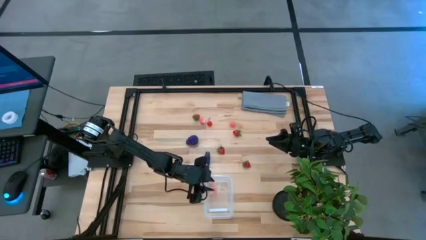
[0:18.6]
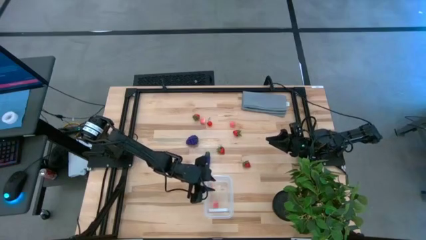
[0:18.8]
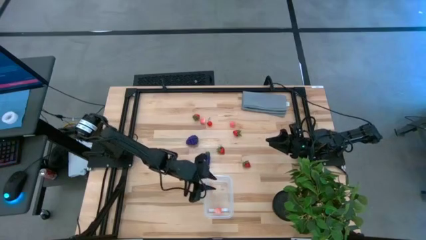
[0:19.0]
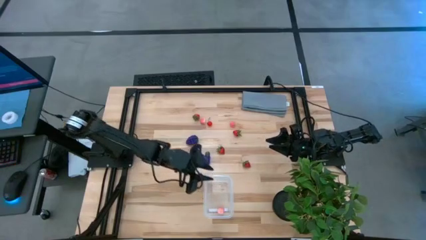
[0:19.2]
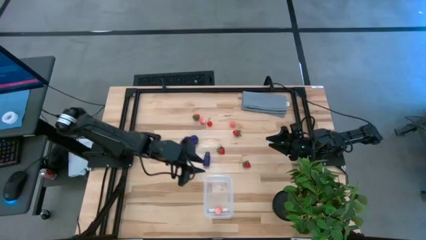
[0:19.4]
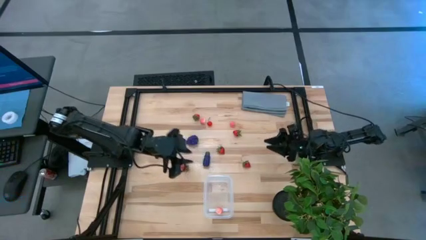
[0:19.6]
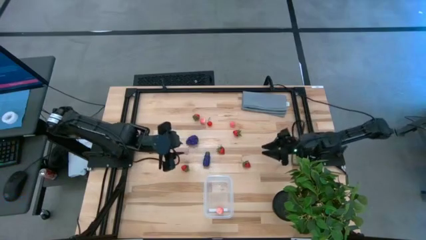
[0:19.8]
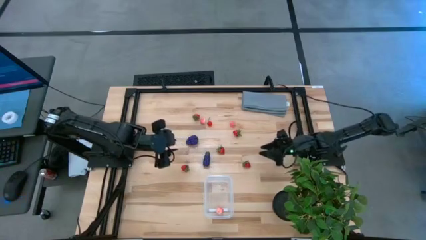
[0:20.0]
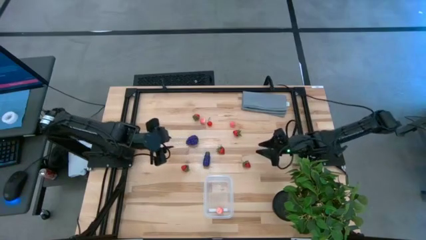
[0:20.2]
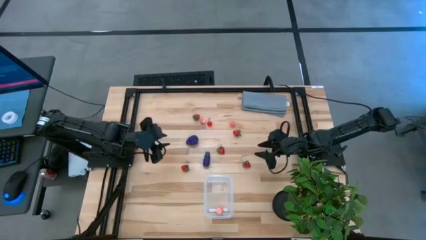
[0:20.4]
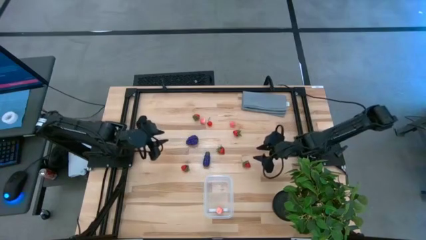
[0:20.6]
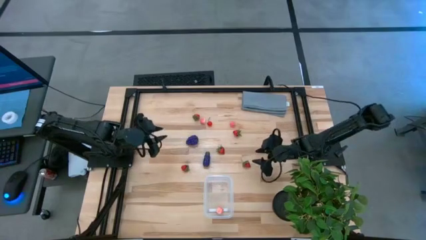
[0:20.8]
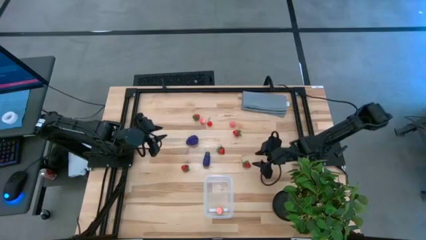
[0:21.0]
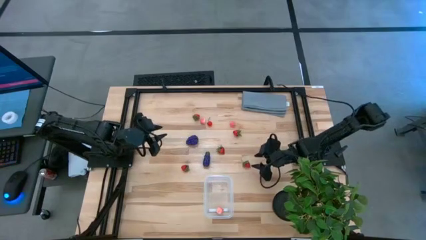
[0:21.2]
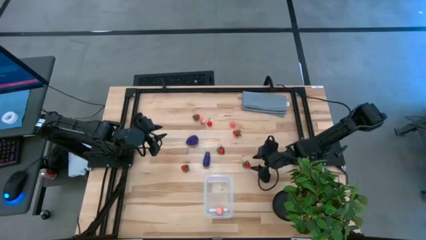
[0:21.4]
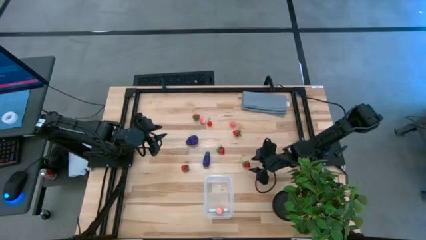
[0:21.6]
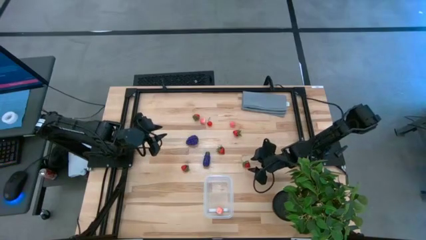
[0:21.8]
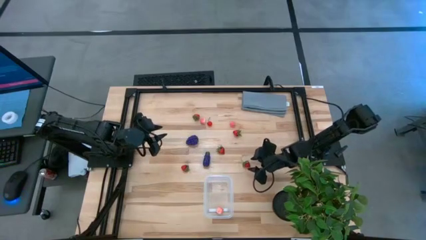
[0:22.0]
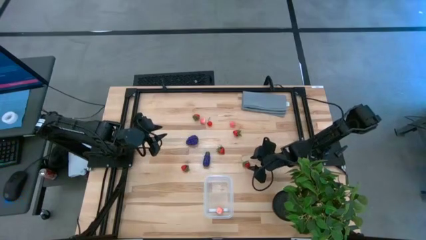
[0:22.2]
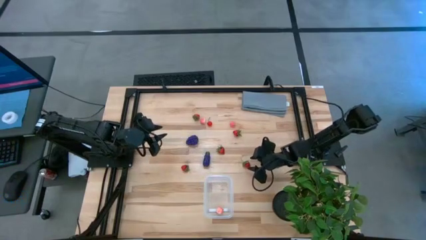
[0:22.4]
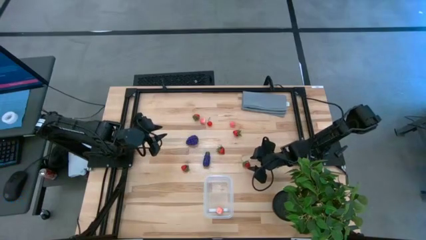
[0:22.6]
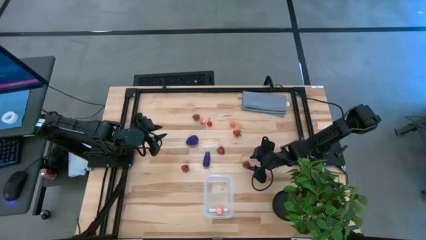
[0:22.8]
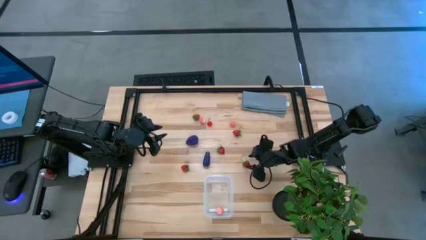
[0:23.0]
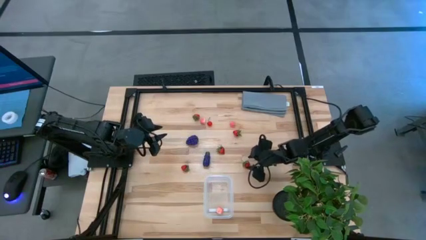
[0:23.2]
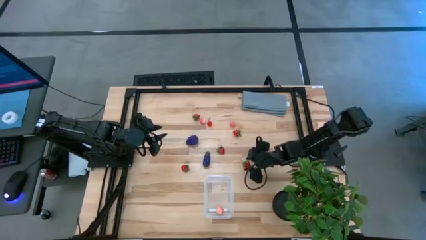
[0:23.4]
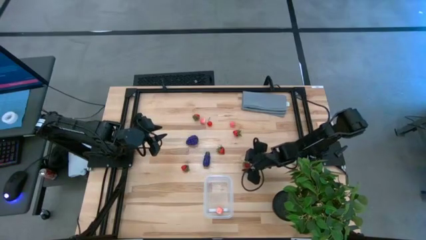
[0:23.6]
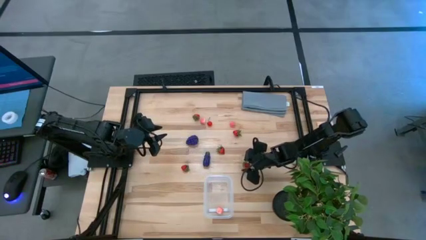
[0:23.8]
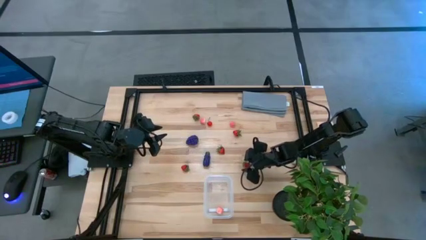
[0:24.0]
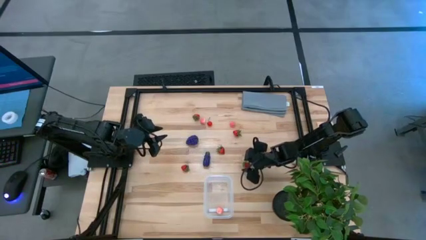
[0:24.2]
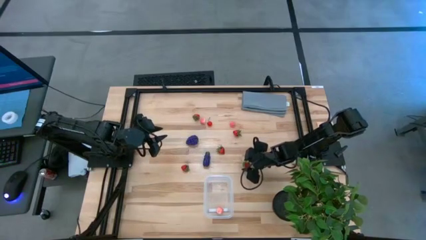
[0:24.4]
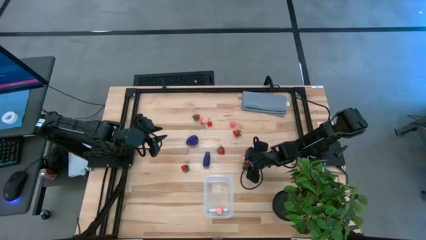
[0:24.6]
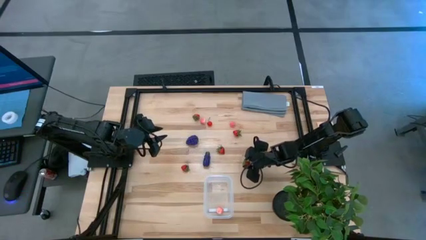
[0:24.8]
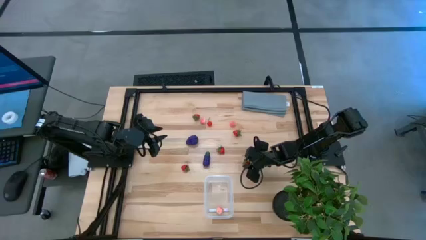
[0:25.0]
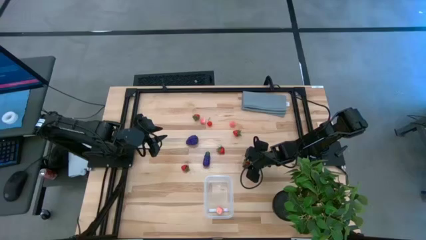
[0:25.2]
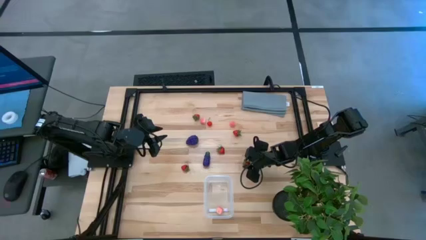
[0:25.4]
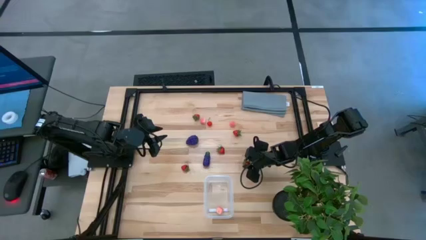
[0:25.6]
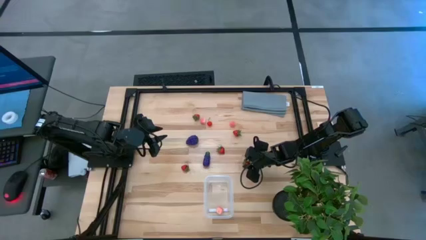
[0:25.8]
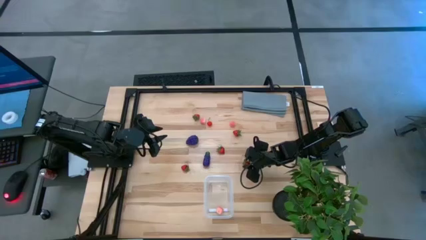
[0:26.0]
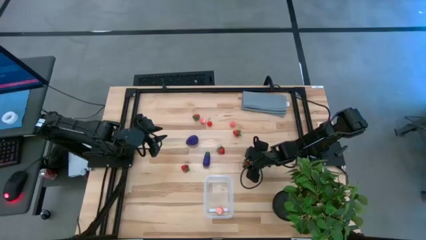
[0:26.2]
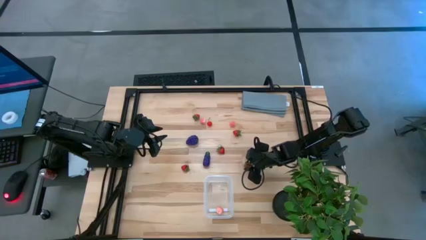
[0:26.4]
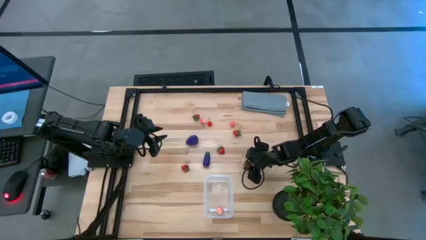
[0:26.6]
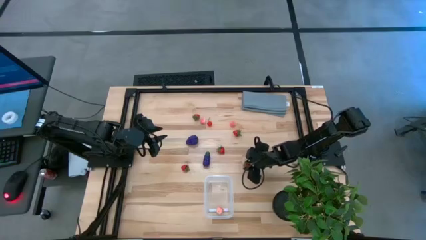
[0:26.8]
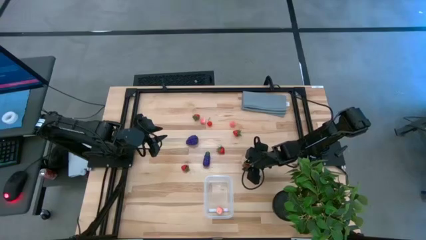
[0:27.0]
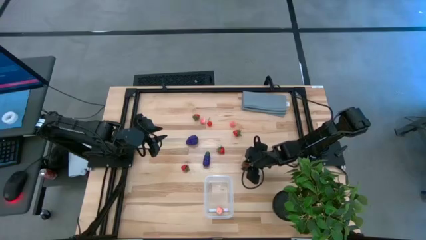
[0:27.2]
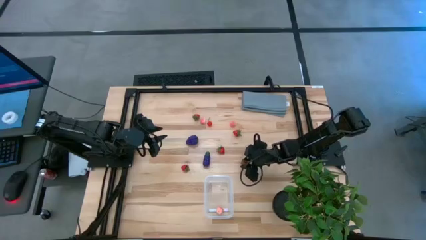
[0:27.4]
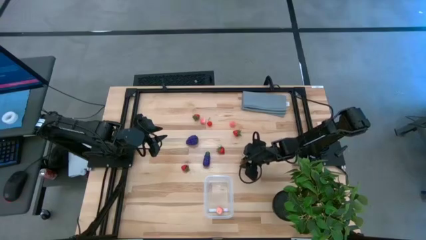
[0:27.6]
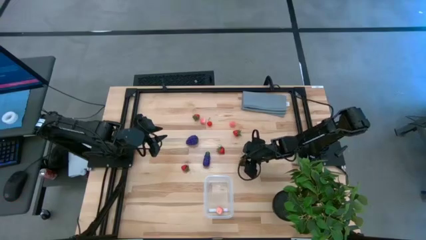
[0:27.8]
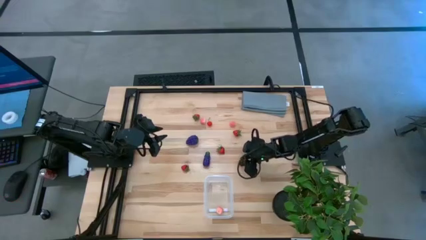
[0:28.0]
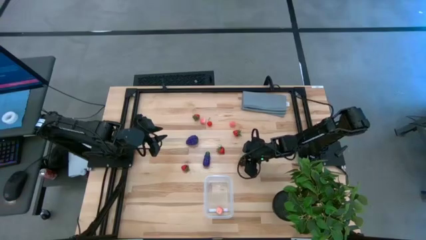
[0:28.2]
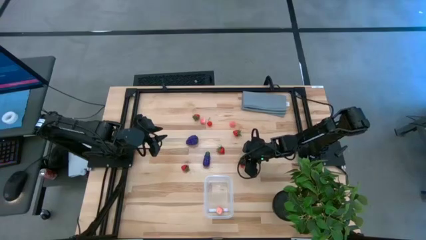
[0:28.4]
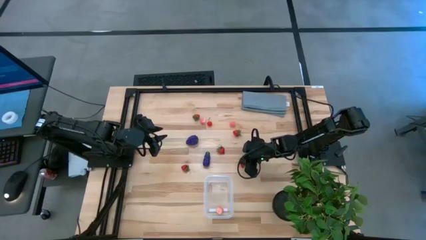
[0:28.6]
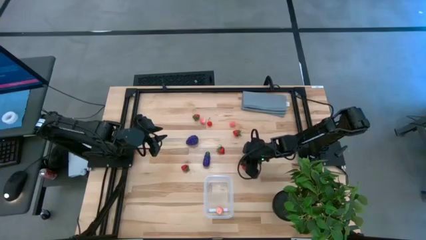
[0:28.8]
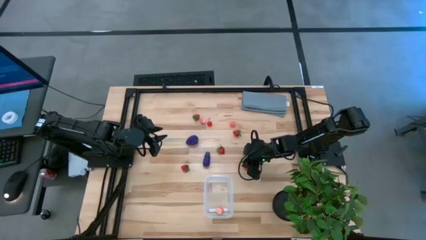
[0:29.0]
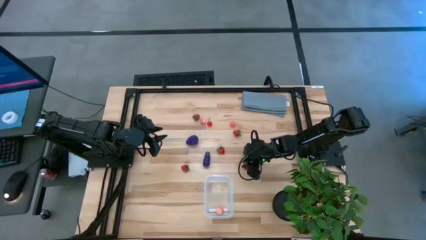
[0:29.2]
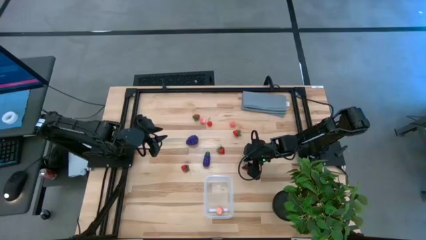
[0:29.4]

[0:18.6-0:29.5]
Task: Pick and placing Produce into tupperware
Put the red strawberry into the transparent bin

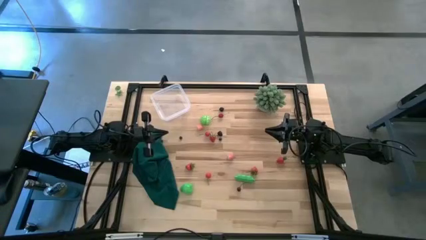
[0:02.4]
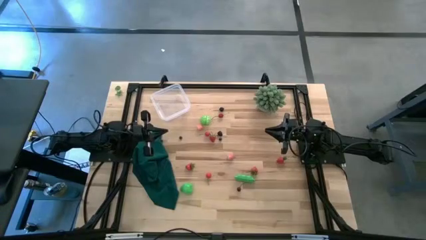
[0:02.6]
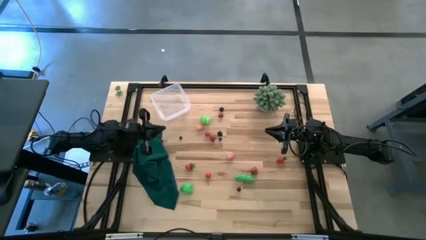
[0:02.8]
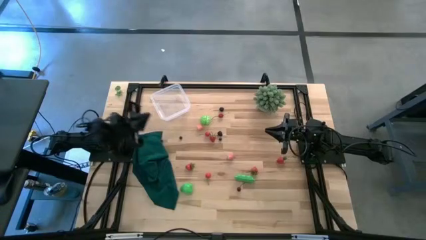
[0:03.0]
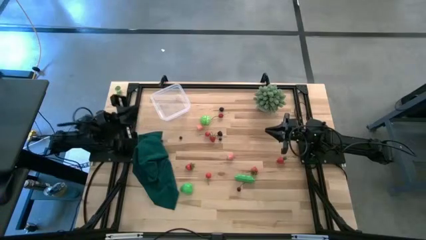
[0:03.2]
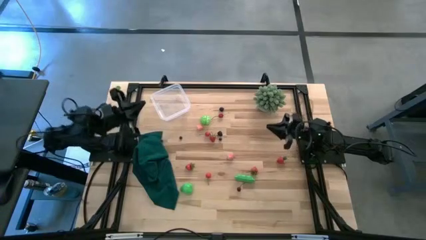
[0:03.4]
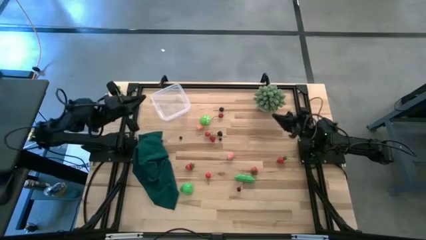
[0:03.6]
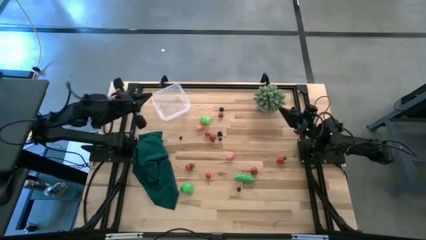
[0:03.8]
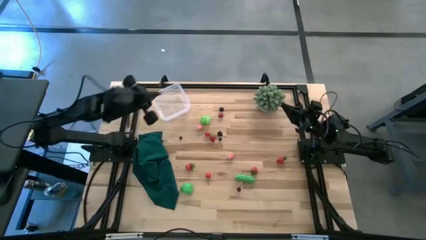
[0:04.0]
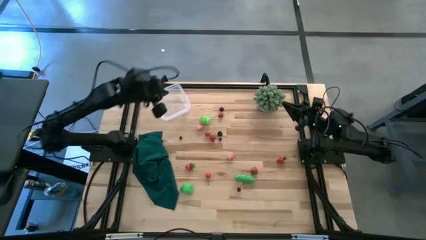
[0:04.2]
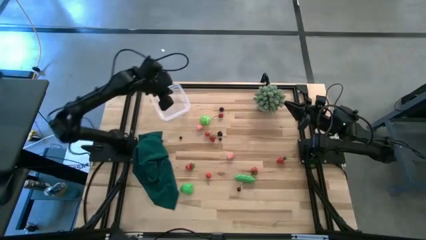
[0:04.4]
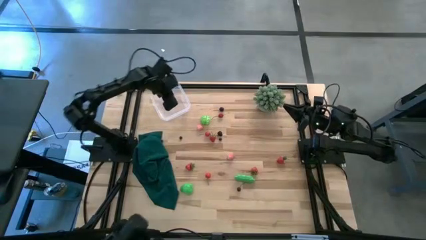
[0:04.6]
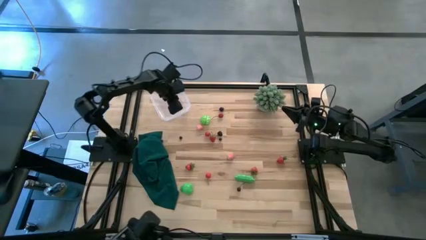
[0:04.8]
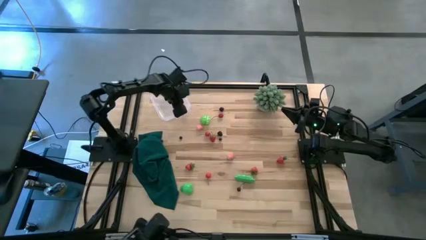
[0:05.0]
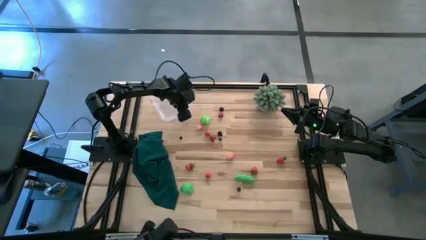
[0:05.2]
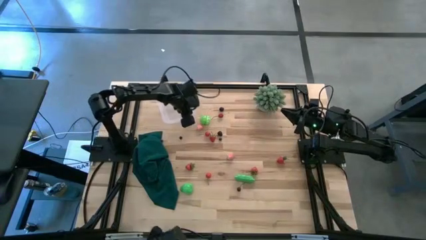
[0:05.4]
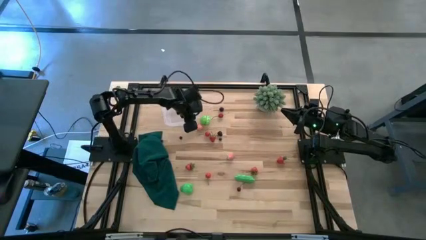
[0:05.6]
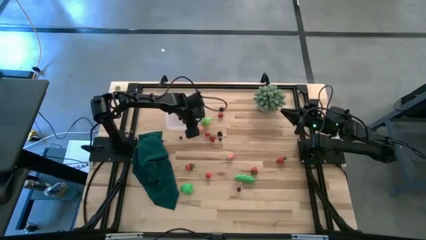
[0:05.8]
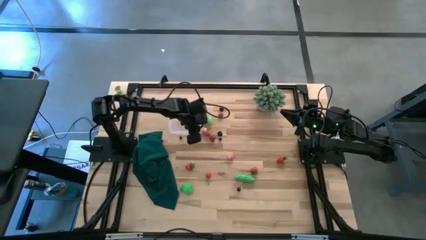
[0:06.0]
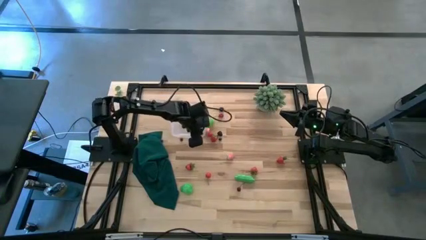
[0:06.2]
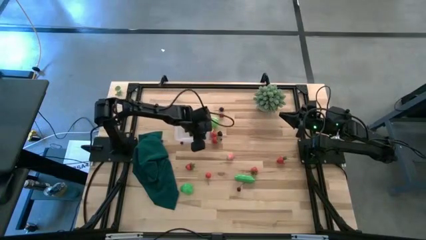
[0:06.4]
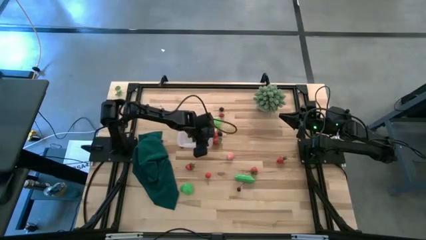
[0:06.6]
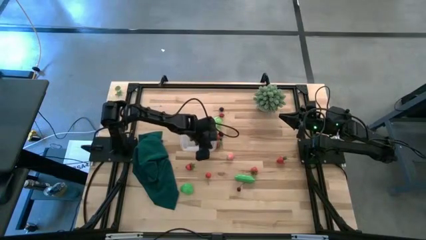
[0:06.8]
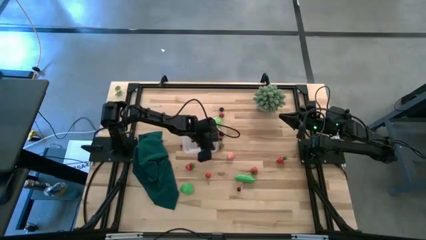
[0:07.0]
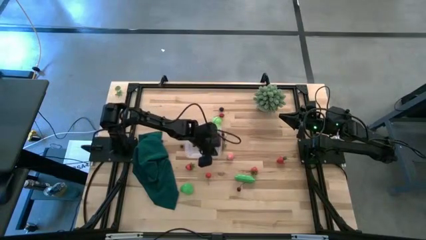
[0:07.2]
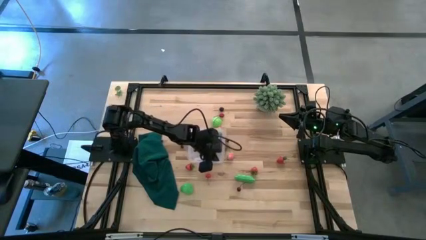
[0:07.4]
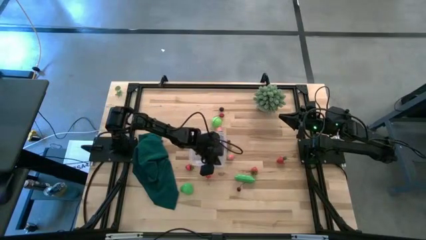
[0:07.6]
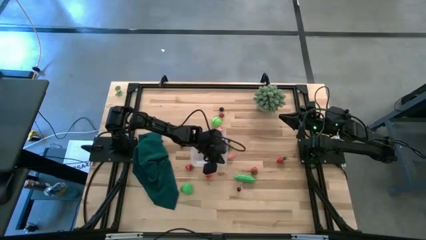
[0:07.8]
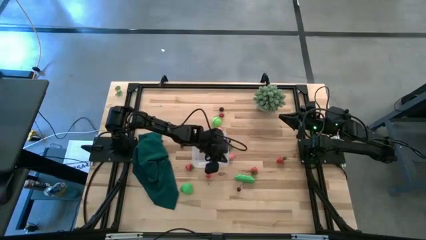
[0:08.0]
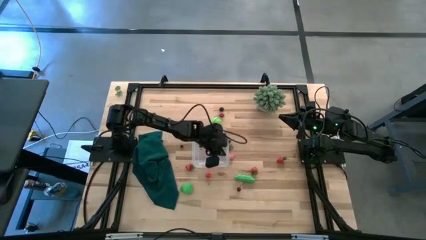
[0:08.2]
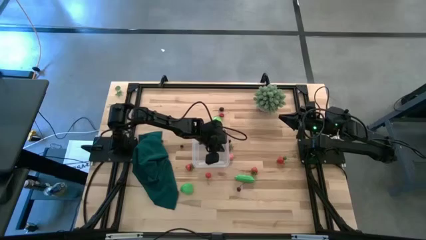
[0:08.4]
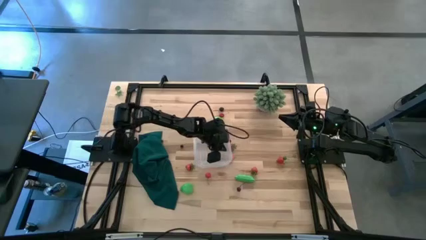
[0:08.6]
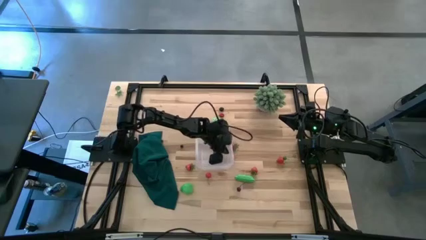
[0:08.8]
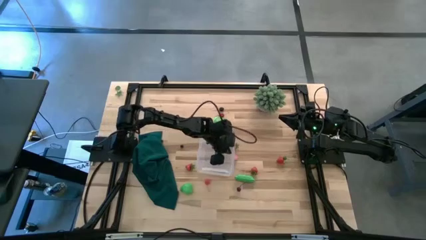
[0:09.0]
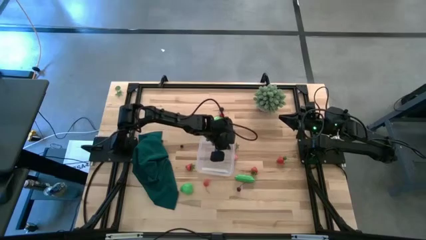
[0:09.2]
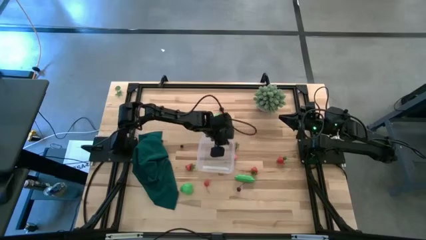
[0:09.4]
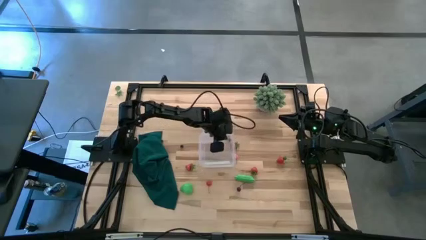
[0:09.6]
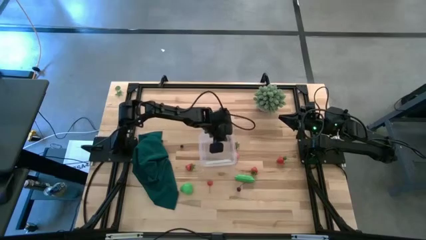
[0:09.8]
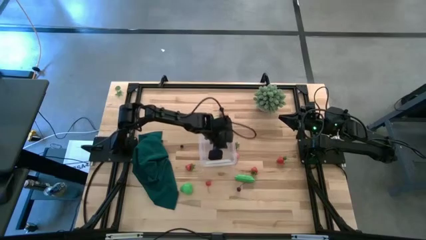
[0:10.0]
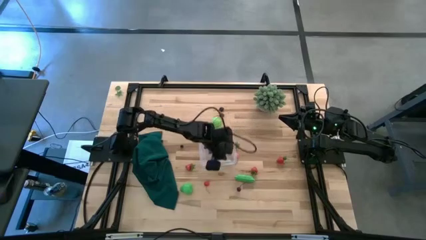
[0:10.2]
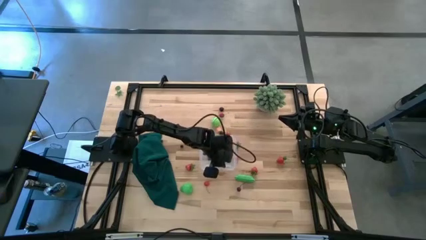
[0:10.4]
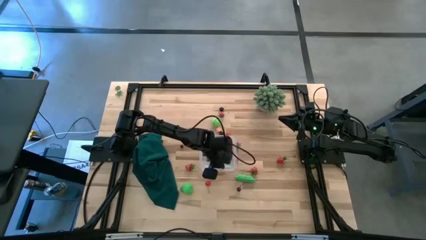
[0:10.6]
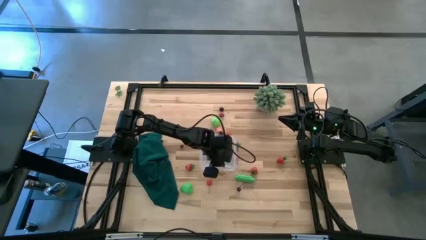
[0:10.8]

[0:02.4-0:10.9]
Task: Pick and placing Produce into tupperware
Move the transparent bin to the center of the table
